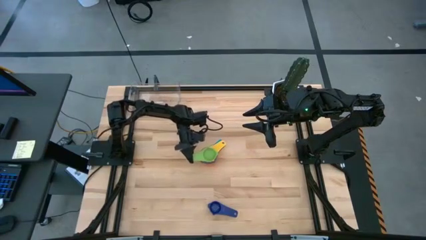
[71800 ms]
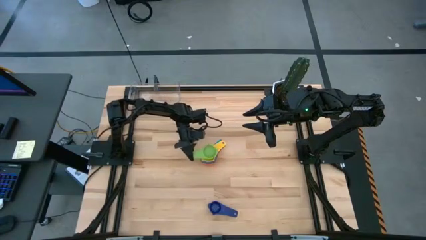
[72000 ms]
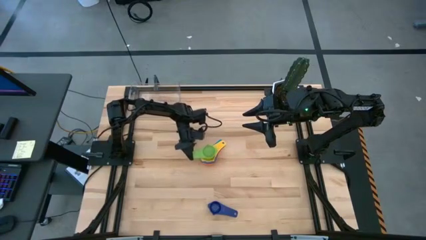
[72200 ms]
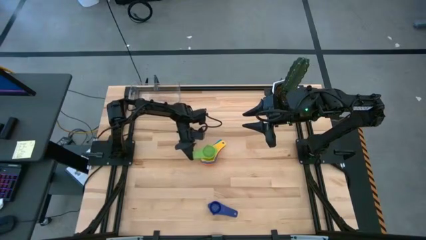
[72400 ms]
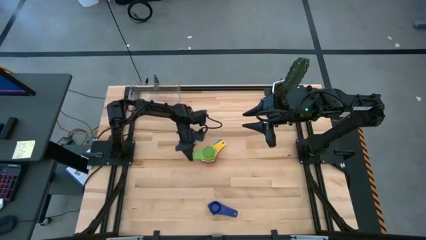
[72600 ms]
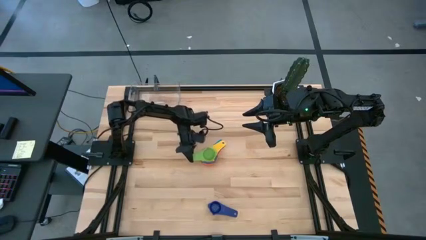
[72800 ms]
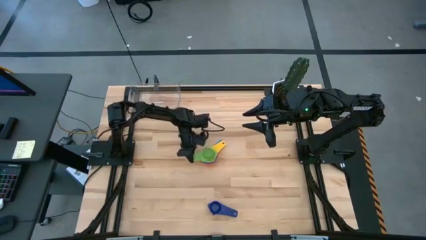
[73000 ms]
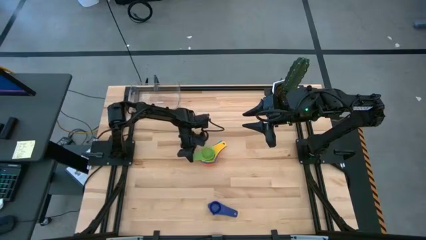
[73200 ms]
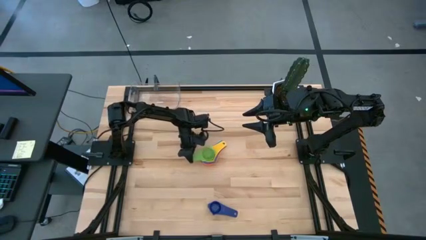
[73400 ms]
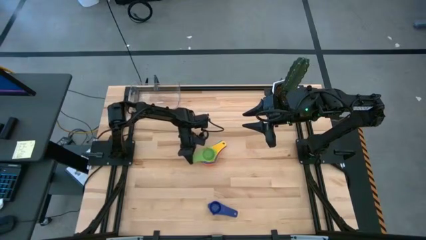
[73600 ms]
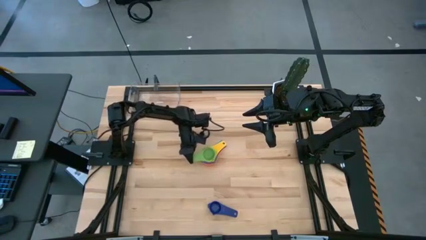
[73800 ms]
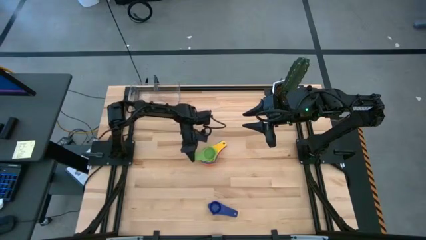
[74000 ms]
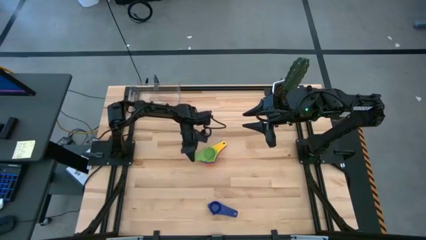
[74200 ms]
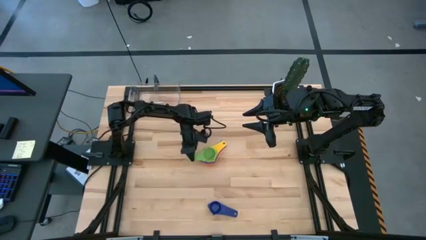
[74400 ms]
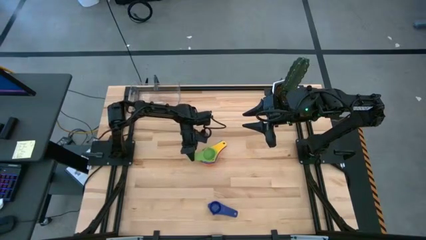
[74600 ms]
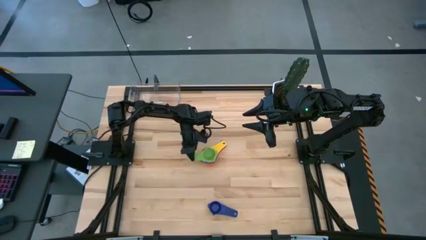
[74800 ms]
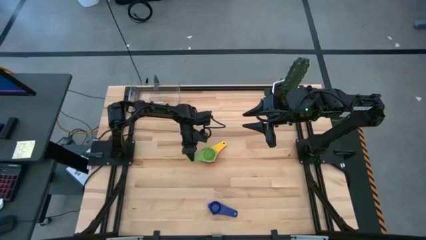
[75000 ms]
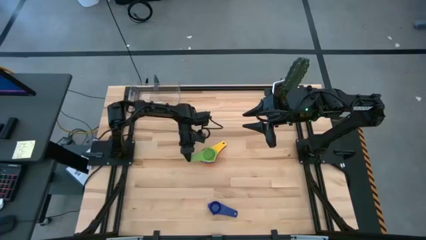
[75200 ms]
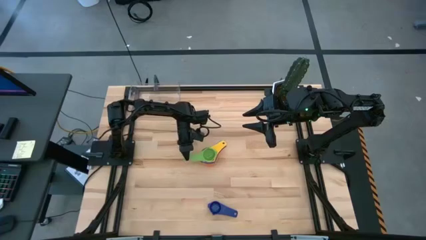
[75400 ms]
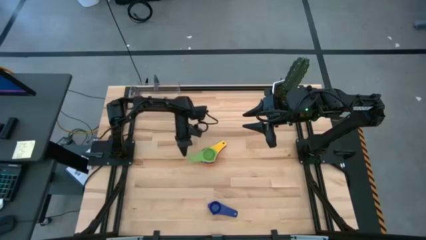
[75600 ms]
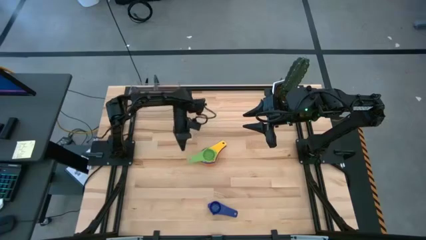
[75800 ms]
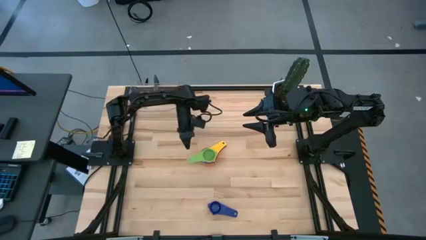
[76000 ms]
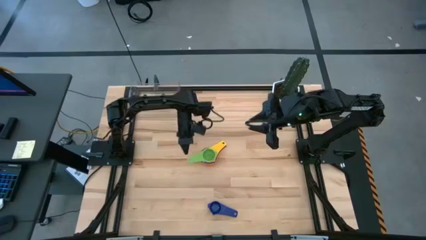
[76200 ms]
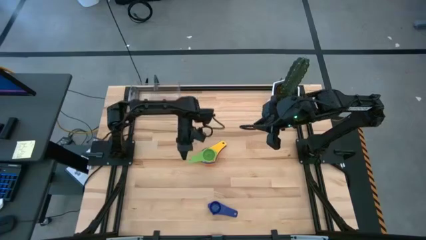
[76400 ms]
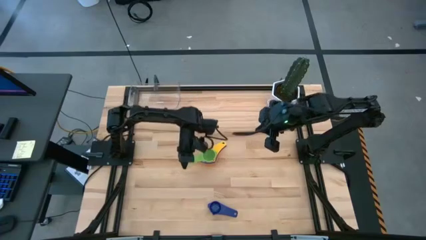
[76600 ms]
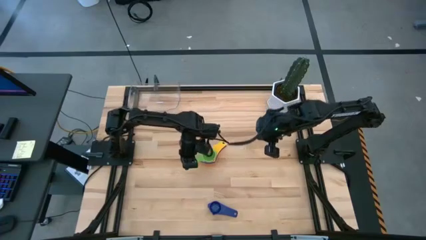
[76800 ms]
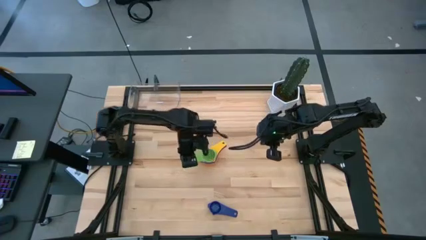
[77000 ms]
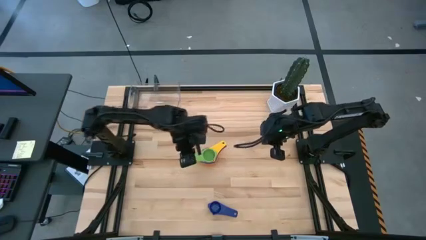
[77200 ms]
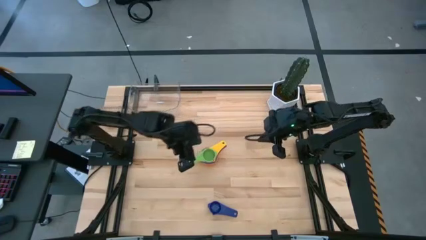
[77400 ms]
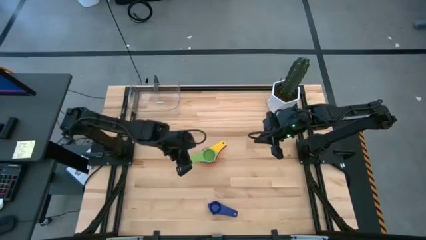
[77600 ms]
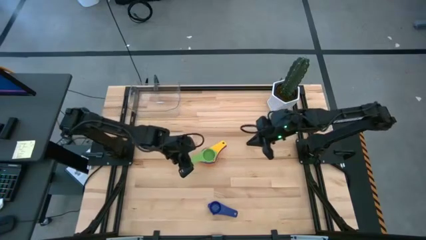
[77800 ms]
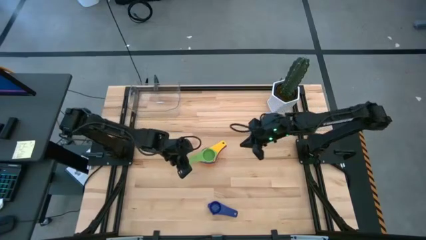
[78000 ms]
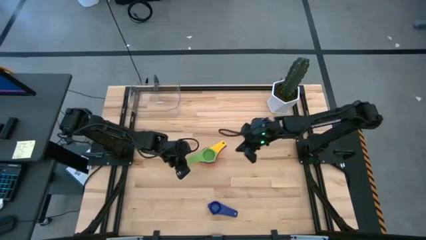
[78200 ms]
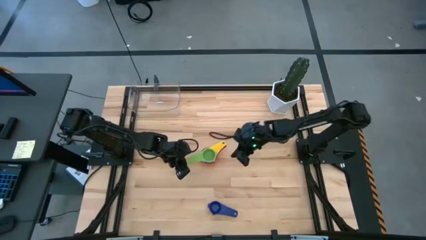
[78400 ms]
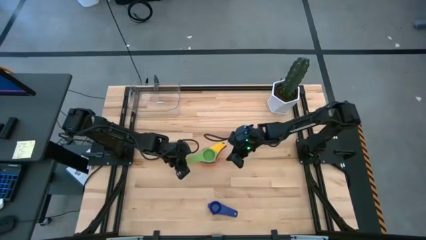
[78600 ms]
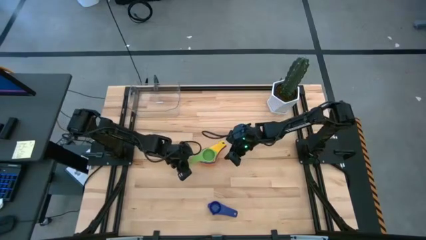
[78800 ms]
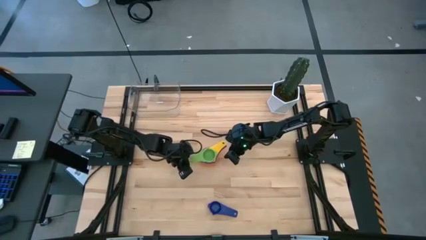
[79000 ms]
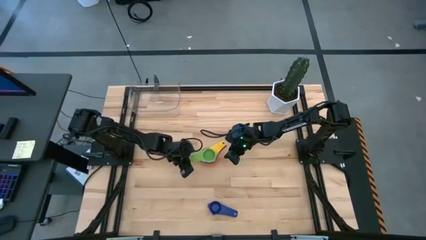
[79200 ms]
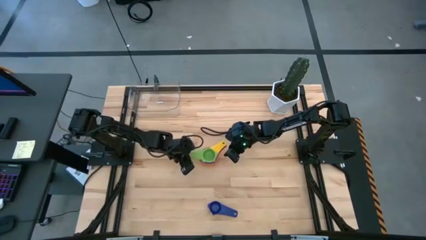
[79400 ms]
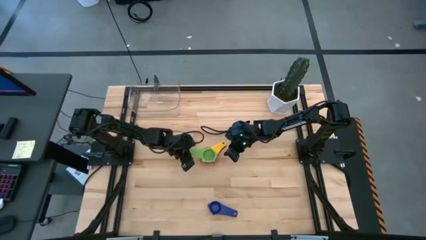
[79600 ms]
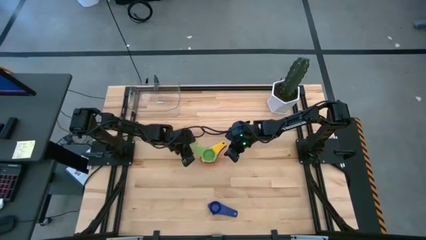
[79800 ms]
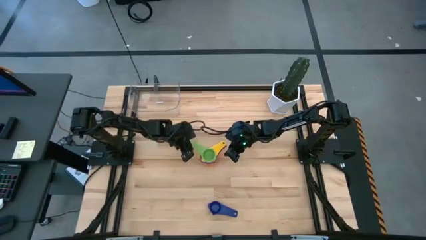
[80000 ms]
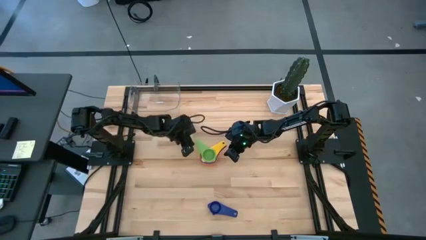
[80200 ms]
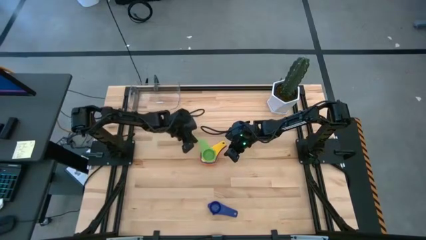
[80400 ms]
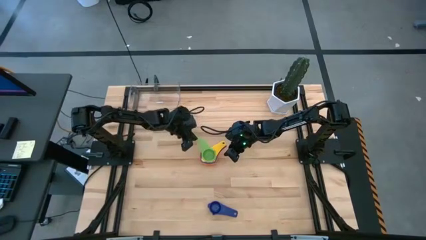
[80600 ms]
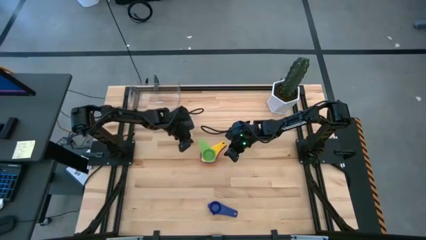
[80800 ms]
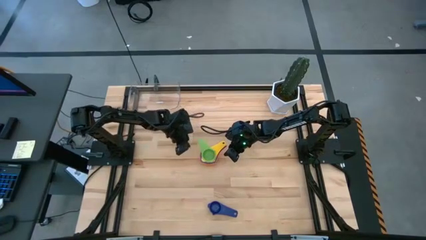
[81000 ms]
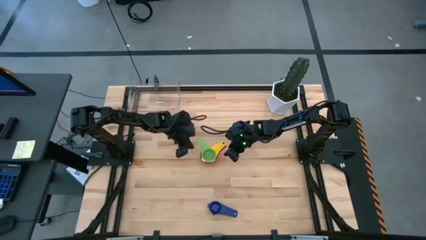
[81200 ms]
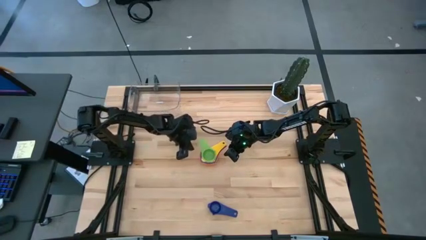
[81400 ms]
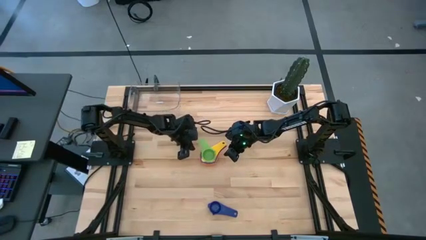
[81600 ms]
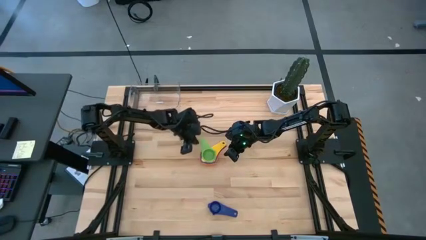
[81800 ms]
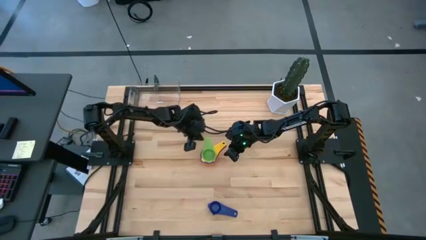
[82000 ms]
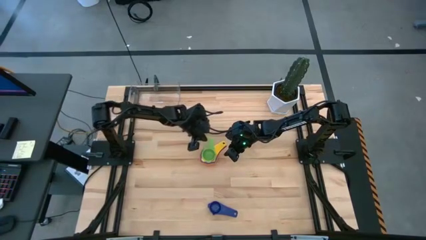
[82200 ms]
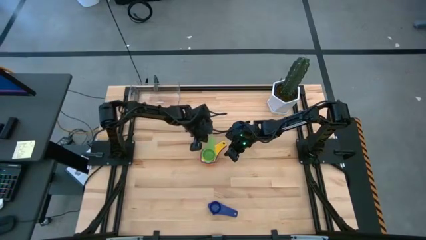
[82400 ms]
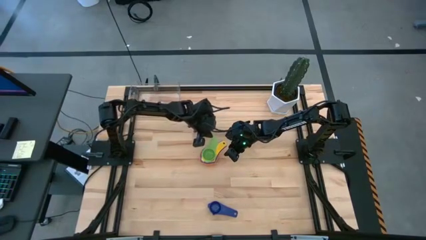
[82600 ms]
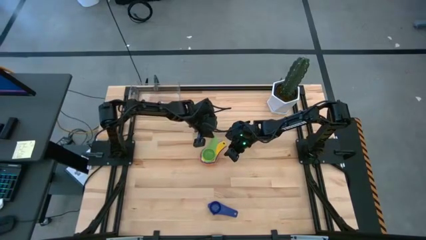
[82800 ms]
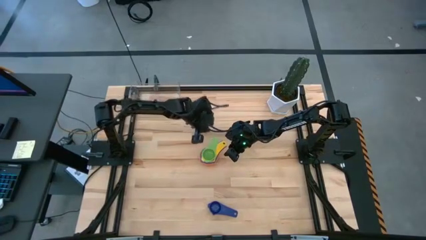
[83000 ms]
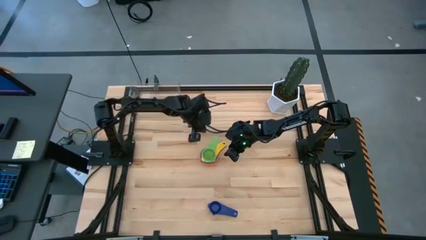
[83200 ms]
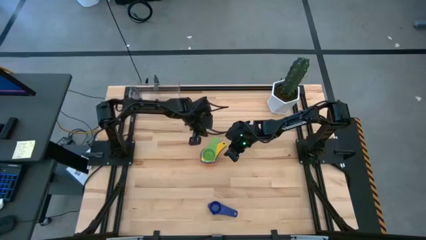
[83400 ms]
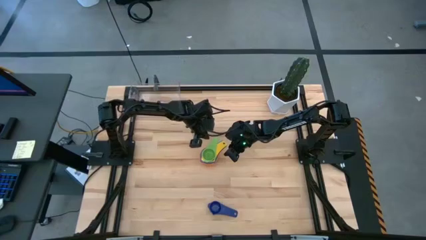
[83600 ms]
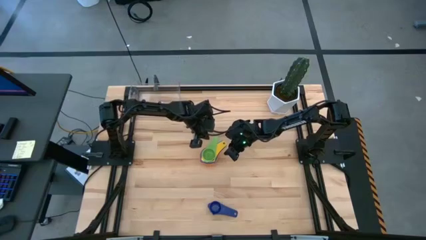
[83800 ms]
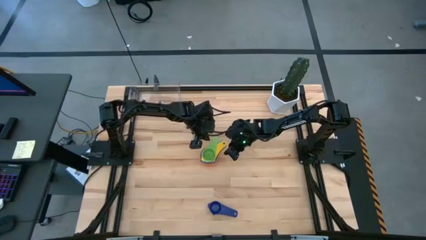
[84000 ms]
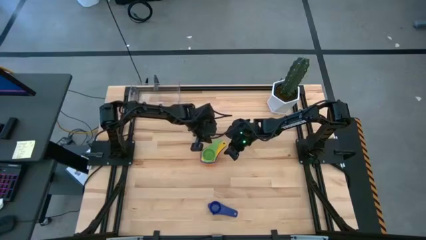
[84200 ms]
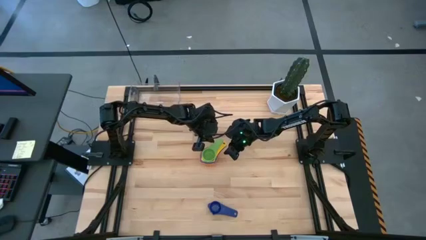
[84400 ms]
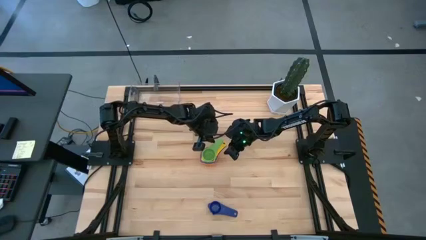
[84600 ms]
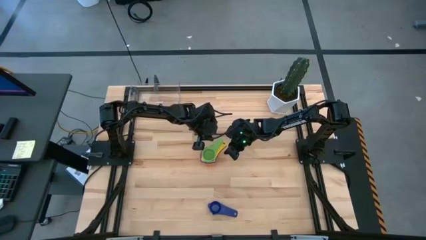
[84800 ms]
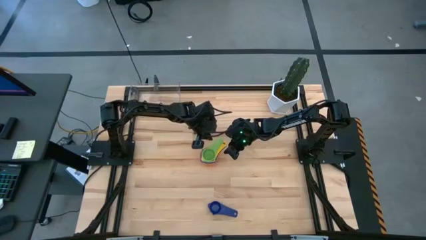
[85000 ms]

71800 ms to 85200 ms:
Task: Nest measuring cups in basket
Stack the green nest measuring cup on top of the yellow nest measuring cup
